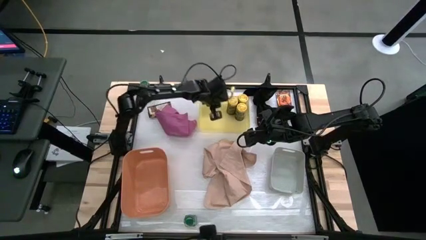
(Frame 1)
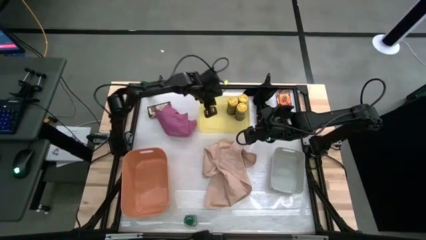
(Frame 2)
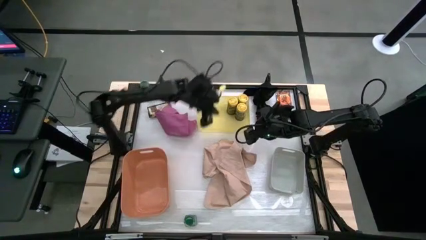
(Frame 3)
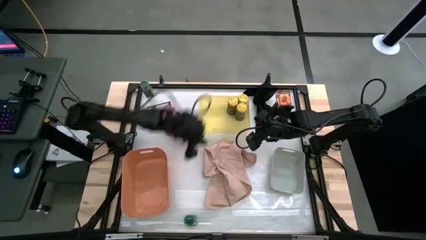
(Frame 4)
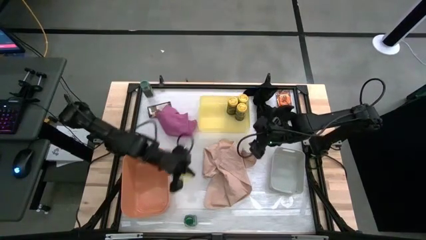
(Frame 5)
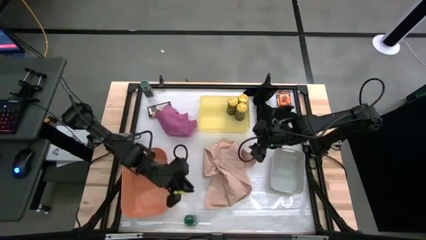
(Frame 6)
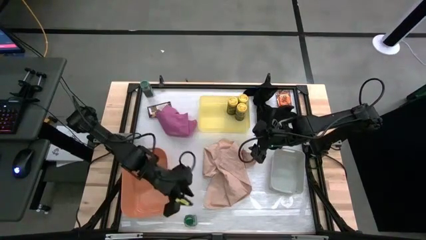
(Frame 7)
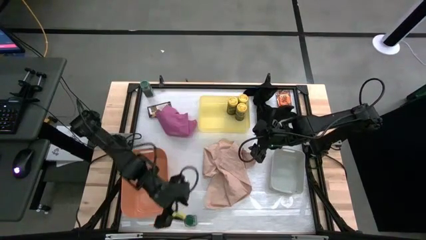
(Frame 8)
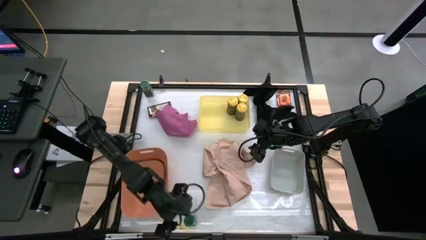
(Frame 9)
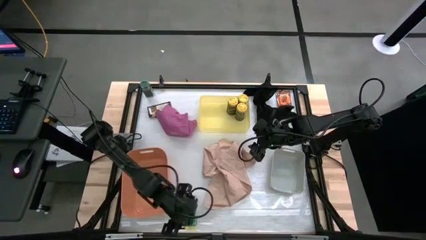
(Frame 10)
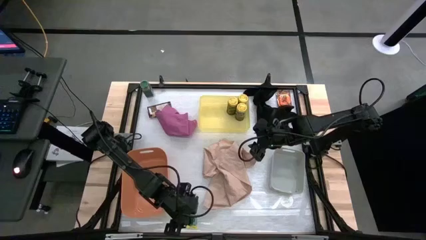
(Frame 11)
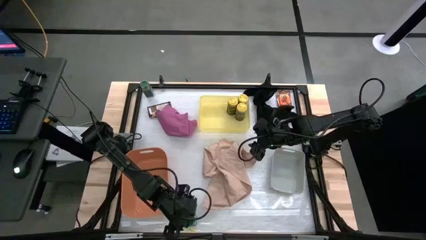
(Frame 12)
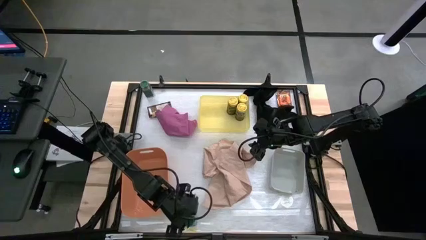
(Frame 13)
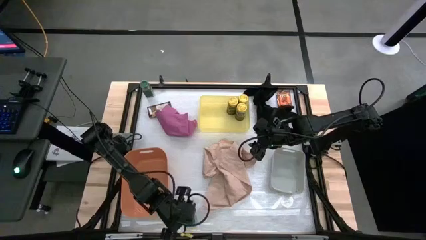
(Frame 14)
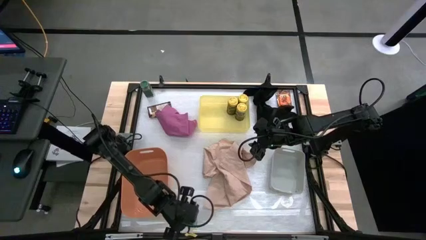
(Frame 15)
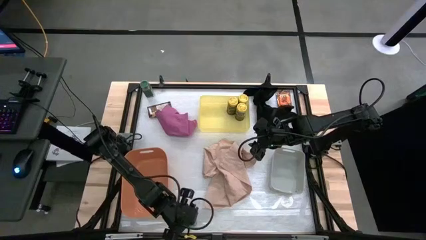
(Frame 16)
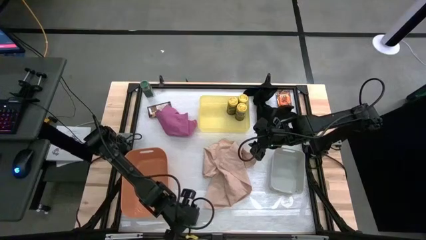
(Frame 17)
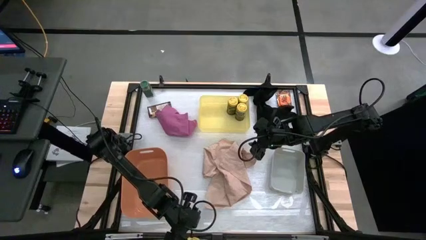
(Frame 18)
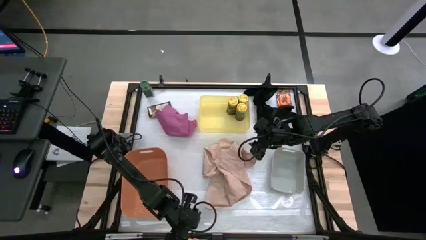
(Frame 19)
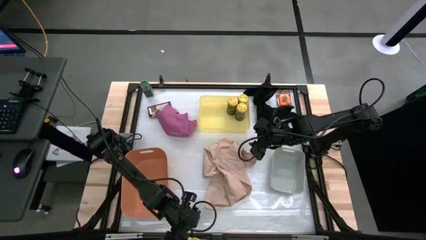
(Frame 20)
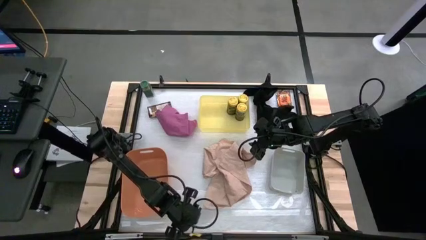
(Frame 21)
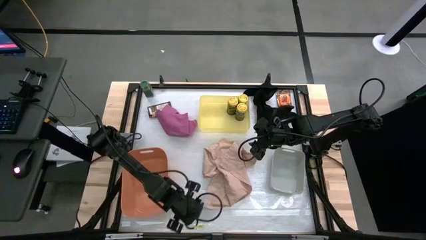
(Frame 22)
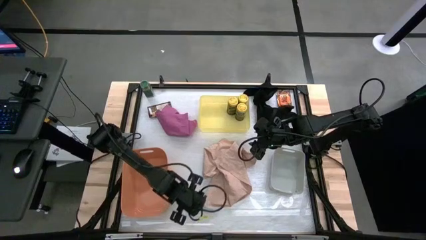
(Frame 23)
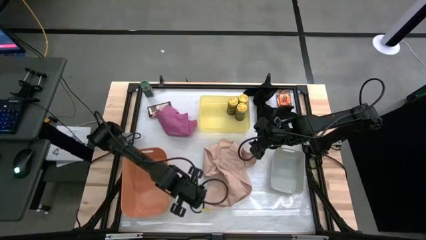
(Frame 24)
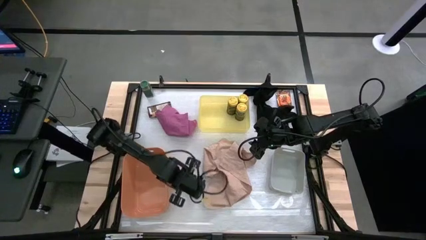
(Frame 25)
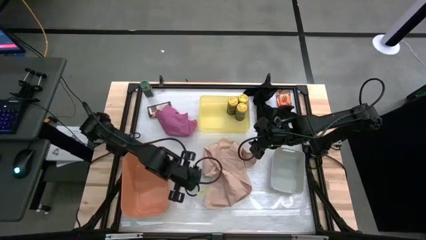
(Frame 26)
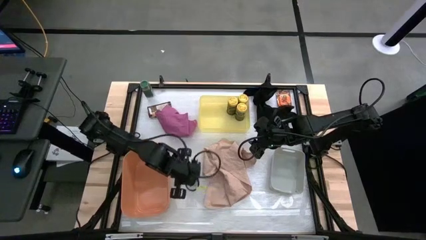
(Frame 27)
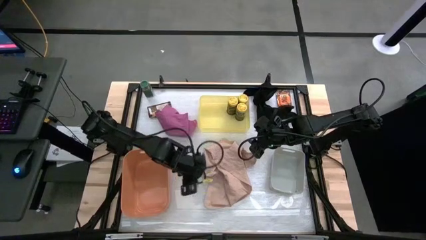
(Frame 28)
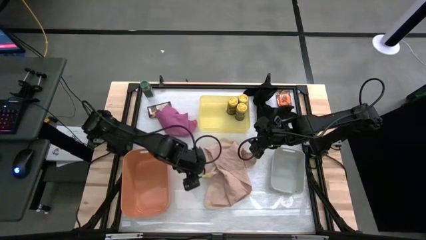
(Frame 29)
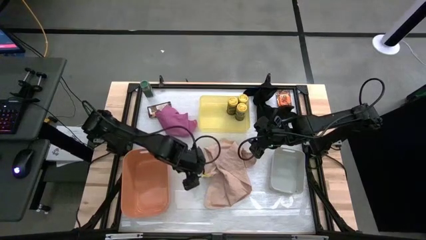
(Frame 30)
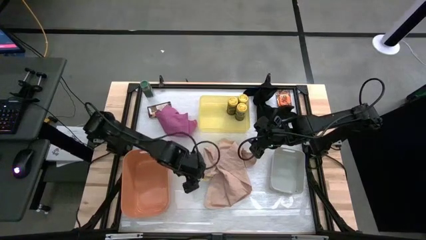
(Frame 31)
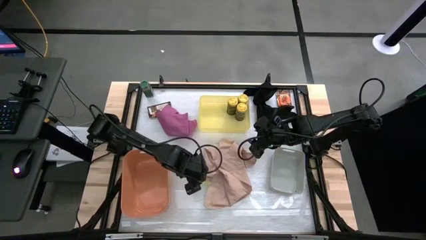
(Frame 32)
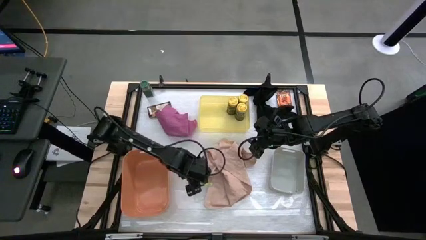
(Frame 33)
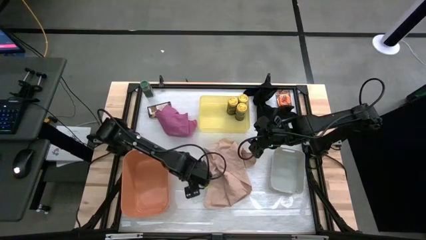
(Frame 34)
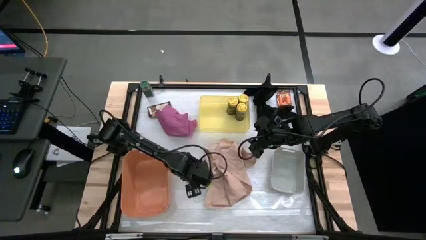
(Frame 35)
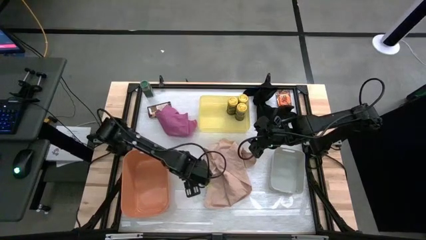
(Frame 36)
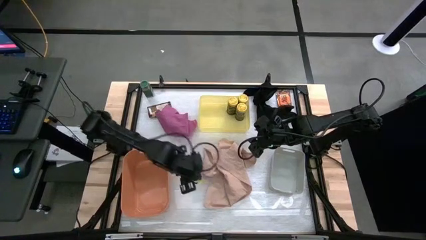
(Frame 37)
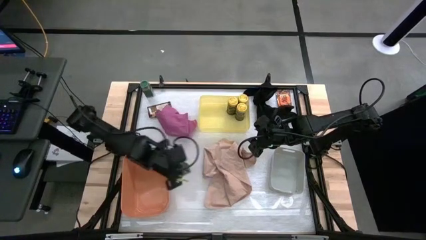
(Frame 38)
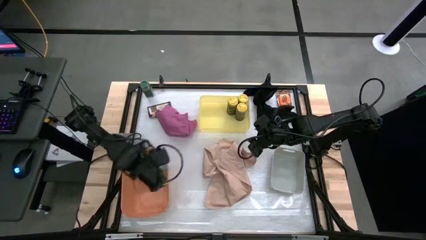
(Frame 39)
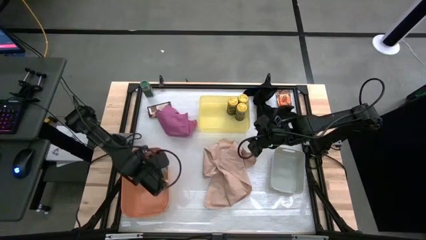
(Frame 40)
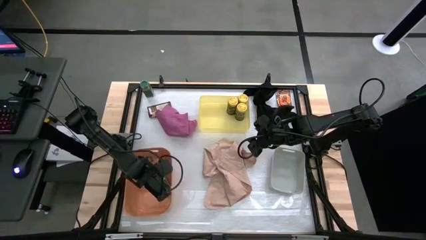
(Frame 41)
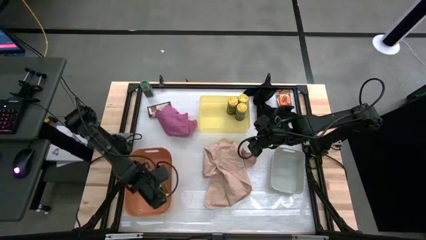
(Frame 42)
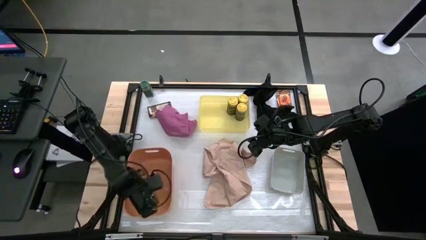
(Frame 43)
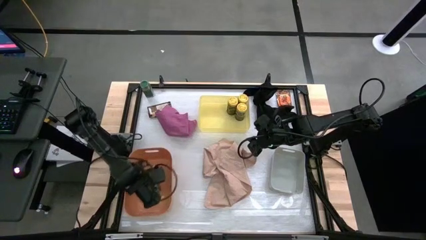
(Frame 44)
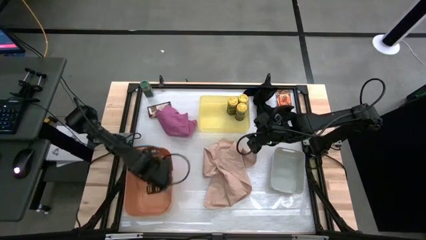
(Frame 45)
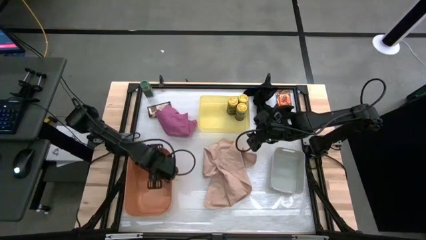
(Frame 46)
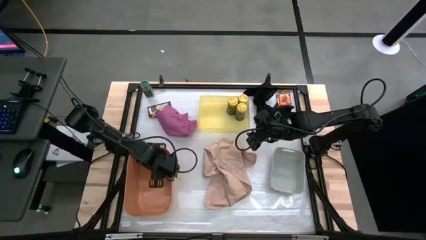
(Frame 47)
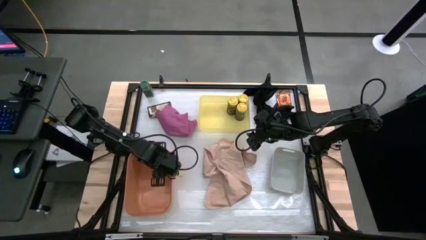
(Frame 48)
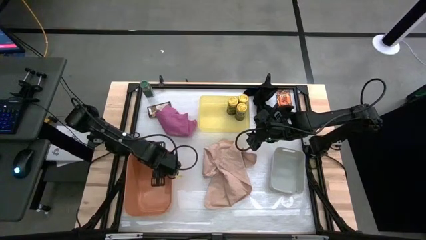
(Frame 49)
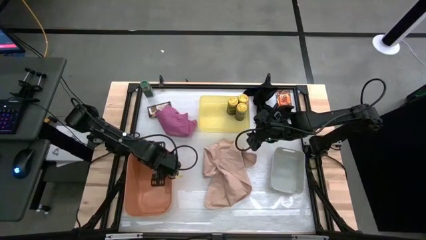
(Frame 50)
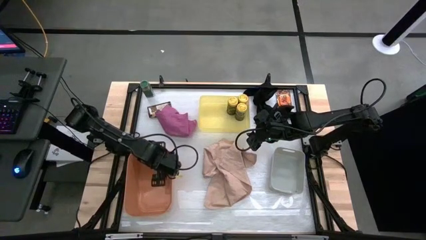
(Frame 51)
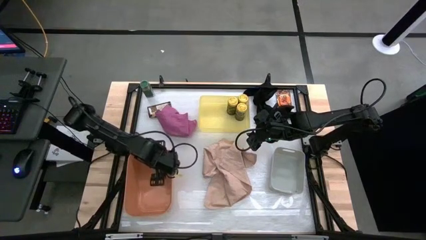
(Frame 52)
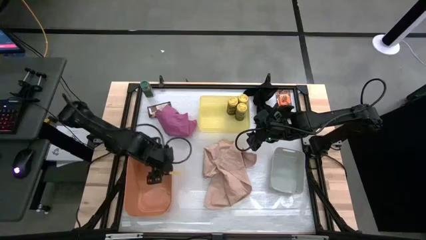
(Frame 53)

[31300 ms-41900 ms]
Task: Sort spices by type
Put the bottom green seasoning bottle into the orange bin

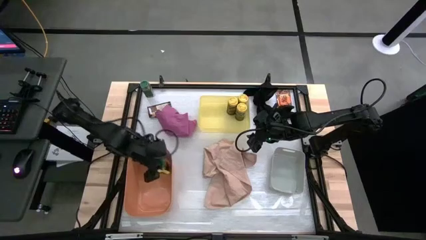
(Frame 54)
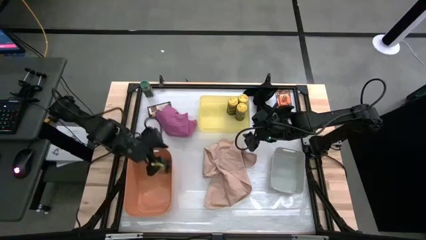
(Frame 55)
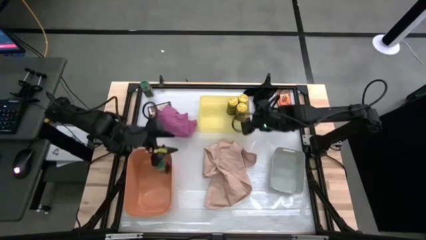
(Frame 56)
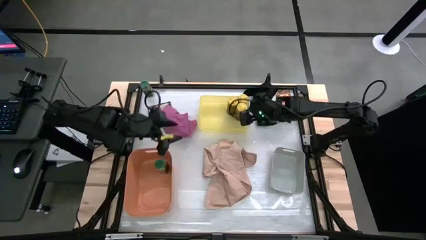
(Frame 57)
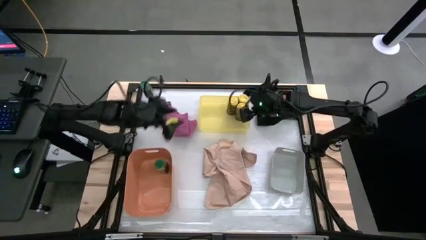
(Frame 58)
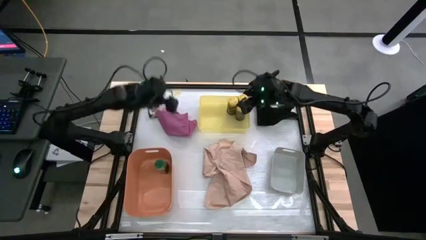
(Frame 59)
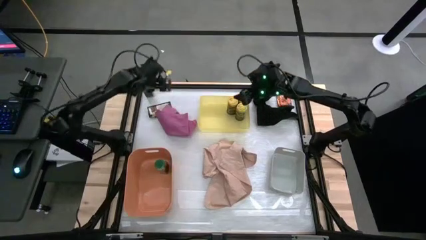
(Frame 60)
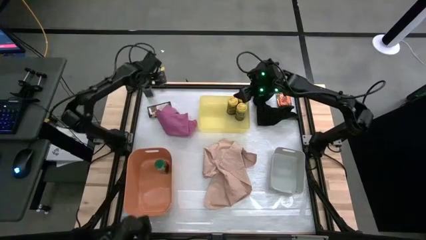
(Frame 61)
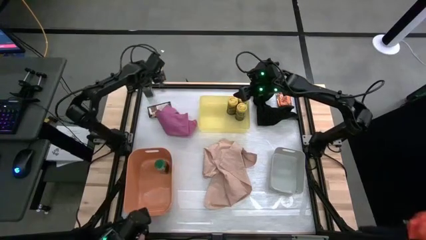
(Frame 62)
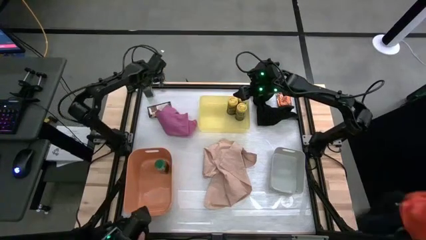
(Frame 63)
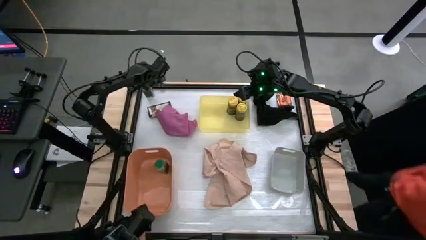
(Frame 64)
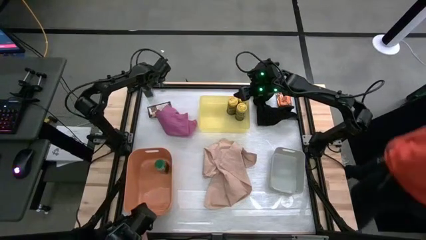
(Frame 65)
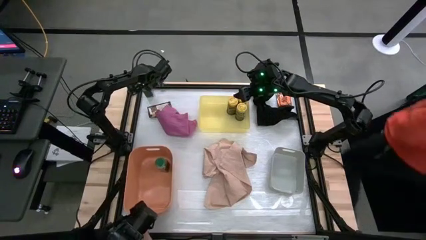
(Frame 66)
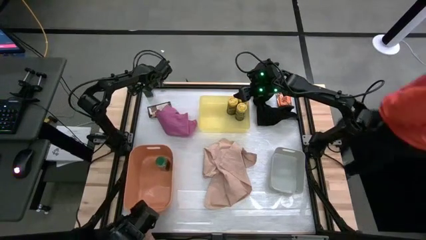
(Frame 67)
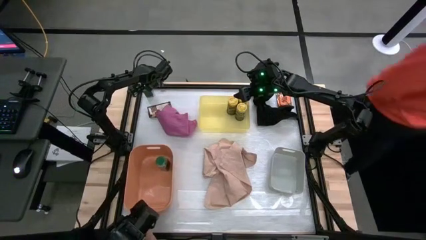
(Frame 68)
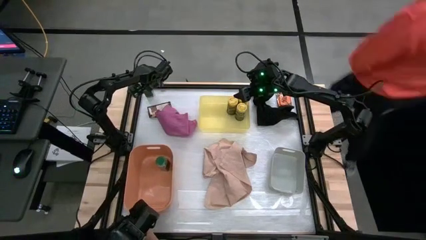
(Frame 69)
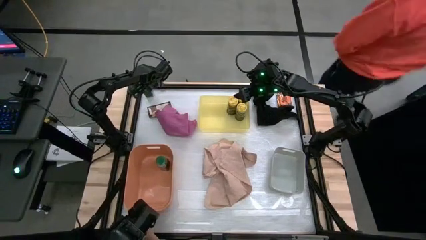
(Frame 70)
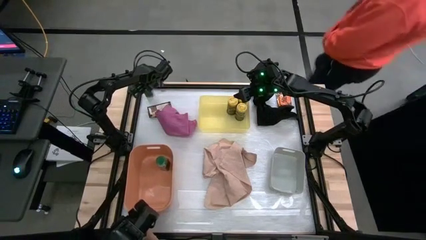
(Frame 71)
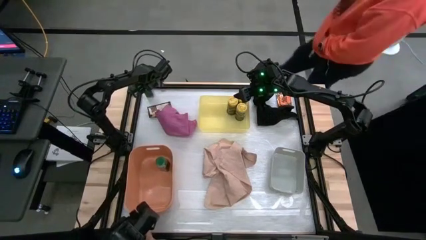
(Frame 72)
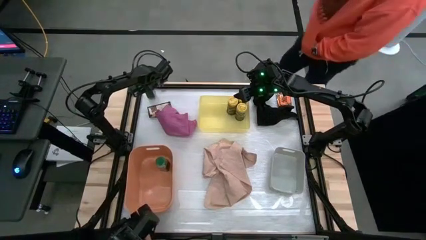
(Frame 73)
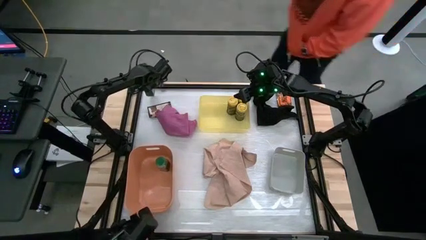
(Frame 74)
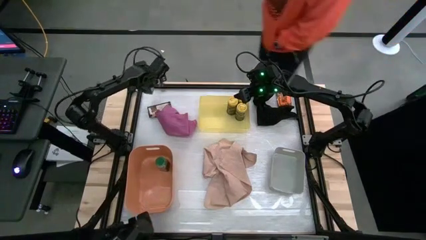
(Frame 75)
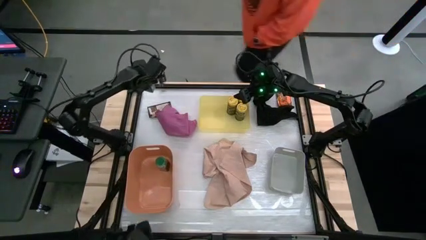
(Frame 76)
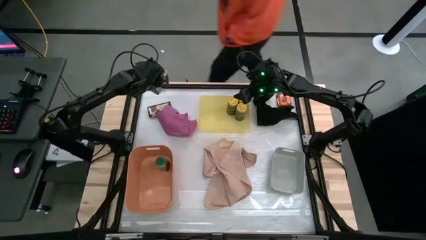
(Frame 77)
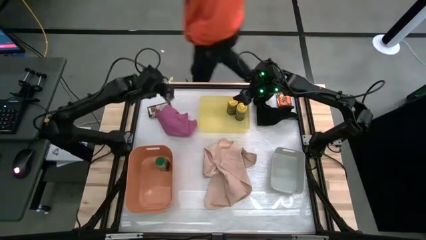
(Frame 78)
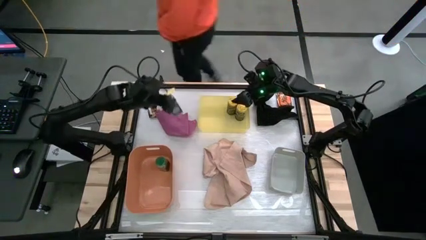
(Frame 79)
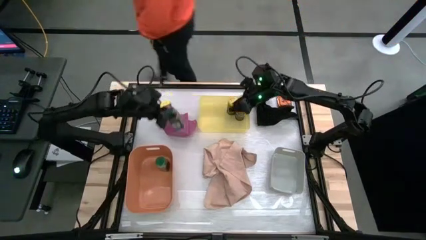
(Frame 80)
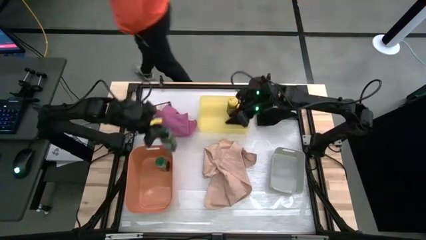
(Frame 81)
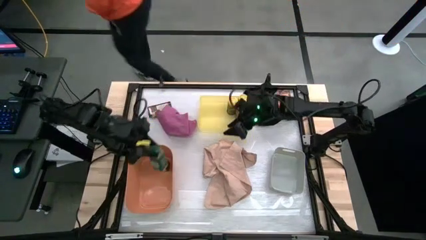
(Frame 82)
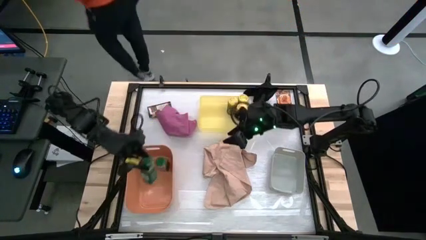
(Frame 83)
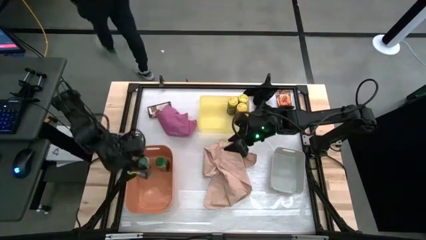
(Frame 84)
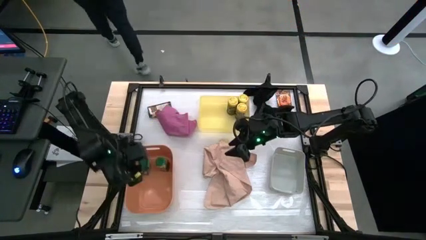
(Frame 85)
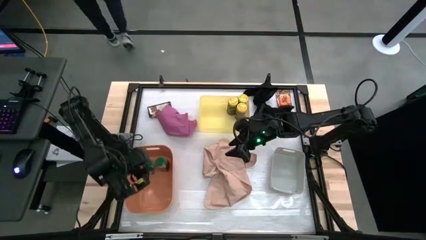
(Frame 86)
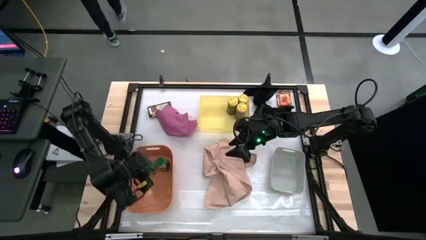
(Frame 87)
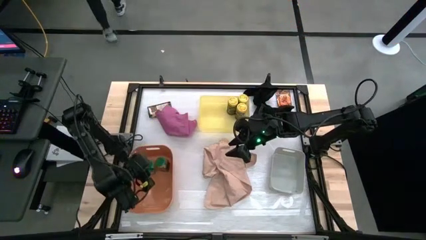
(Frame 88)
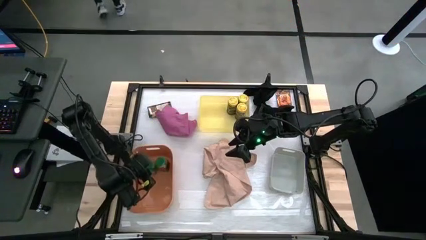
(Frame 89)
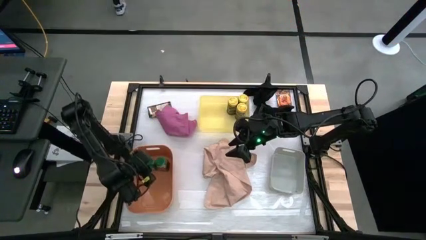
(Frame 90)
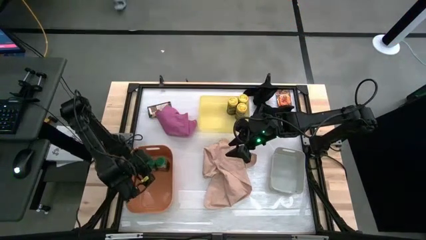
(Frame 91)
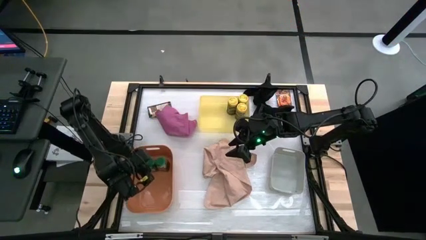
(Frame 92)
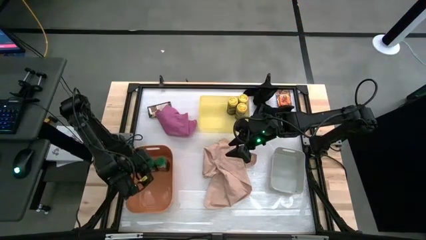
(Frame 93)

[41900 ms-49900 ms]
Put the green seasoning bottle into the orange bin
